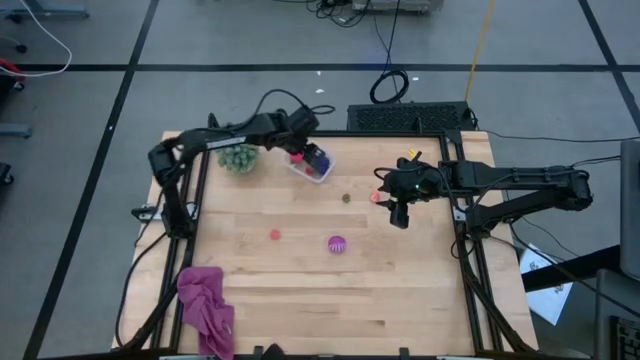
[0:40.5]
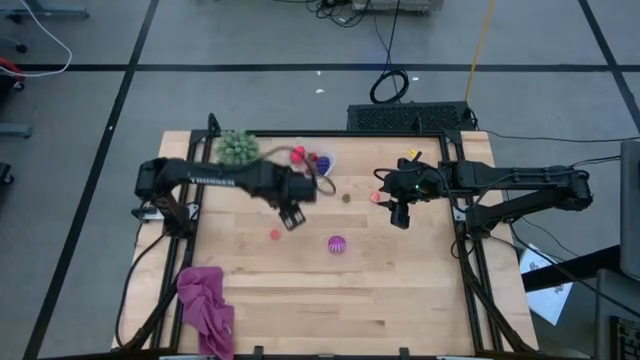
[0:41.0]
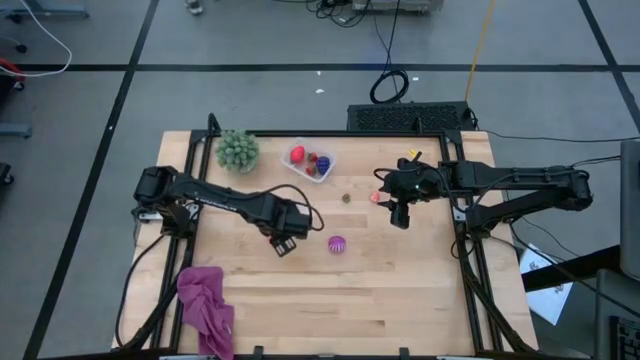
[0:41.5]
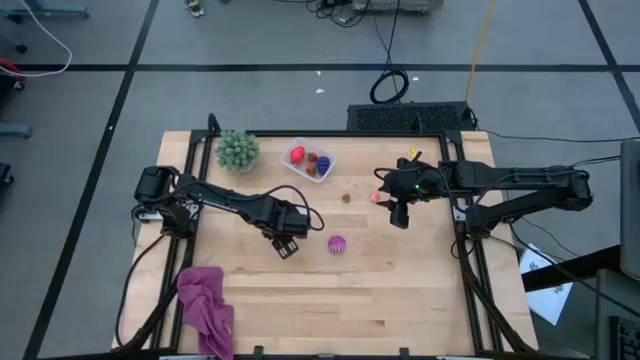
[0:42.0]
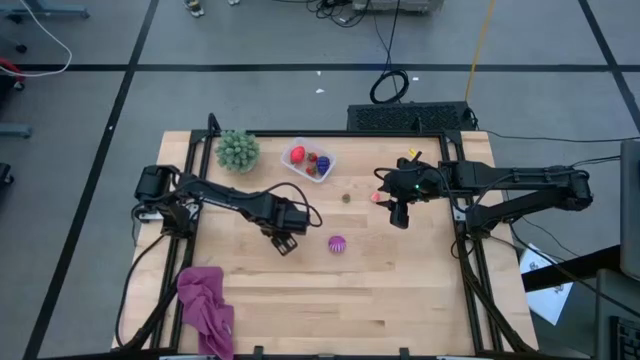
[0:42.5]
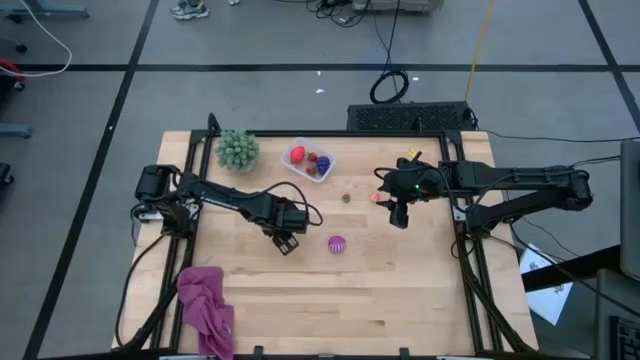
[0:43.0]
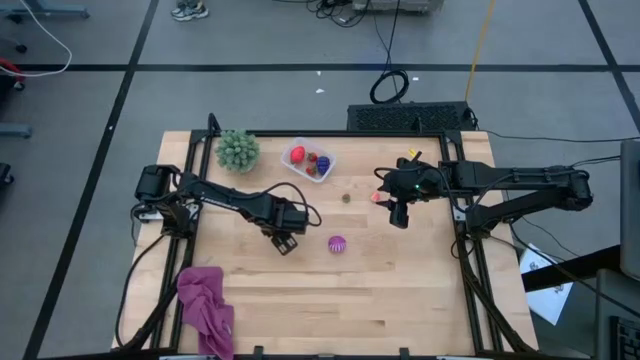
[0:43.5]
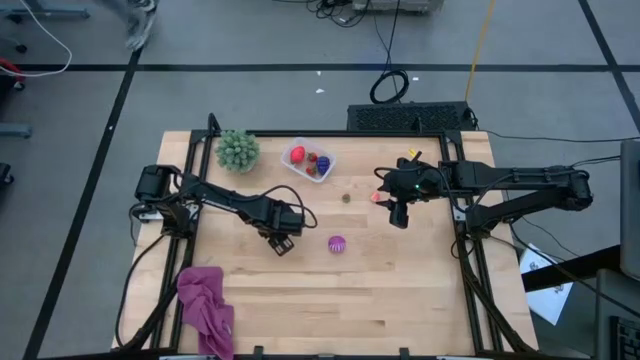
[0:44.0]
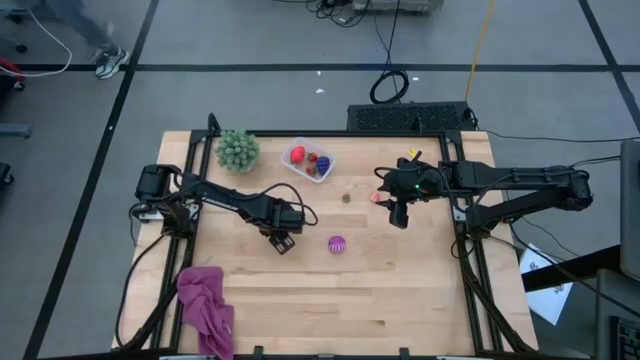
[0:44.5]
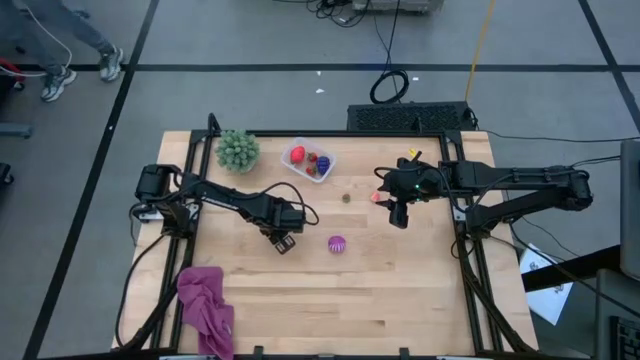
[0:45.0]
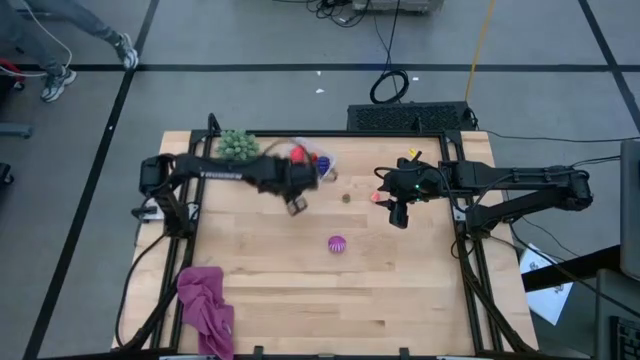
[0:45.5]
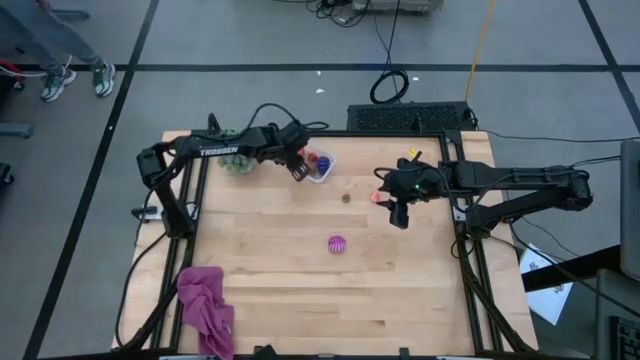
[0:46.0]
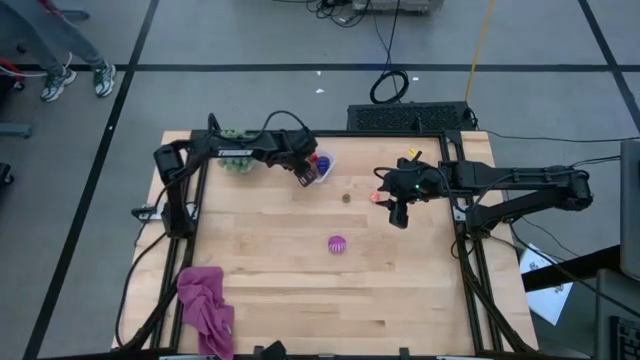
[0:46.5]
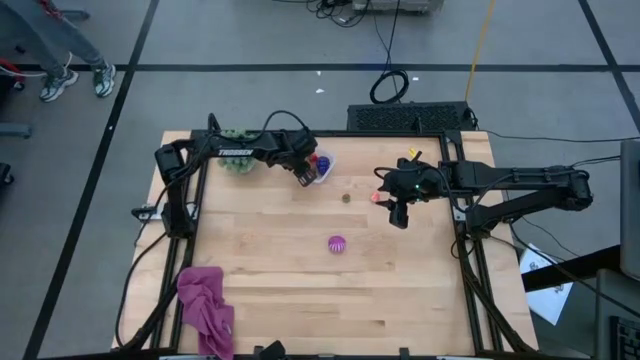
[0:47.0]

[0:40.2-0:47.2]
Task: Pick and placing Produce into tupperware
Put the left pink peach into the transparent bin

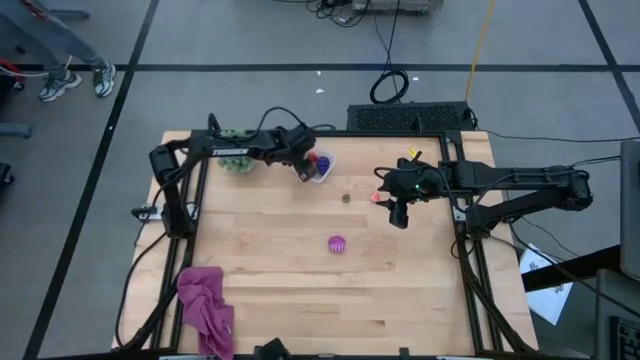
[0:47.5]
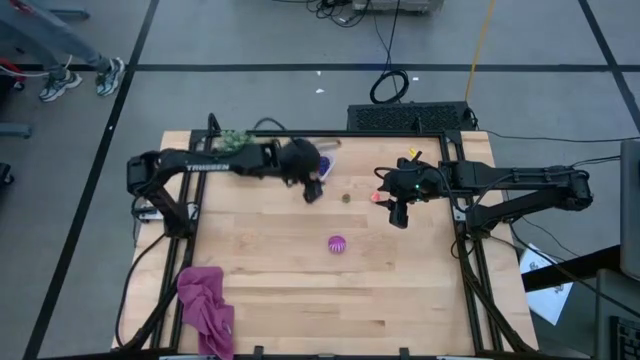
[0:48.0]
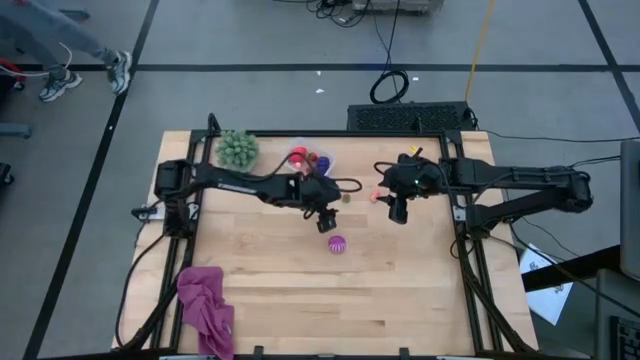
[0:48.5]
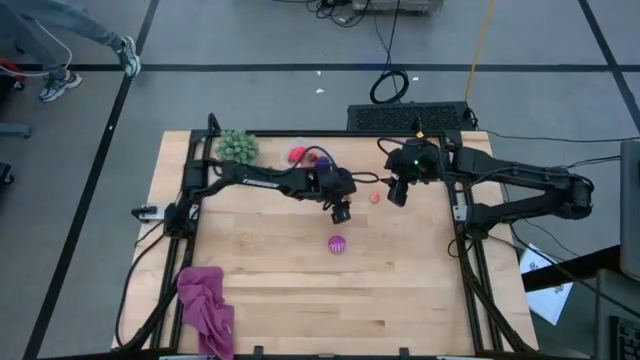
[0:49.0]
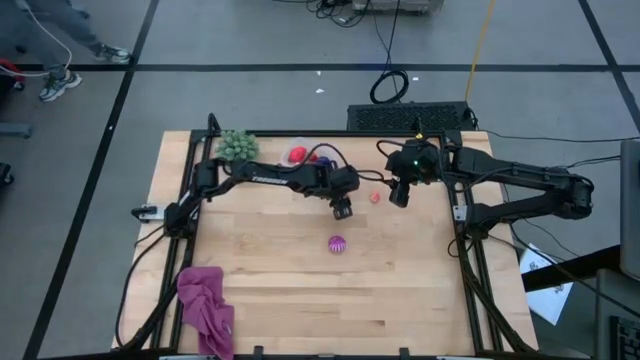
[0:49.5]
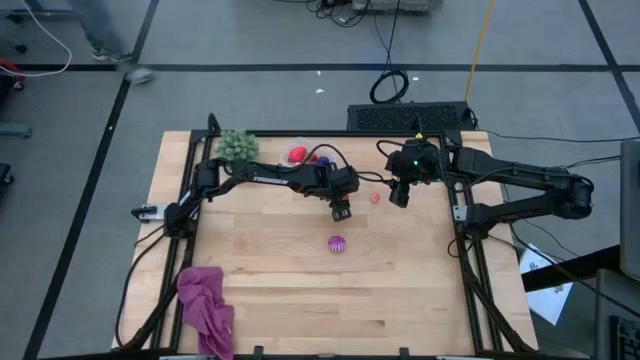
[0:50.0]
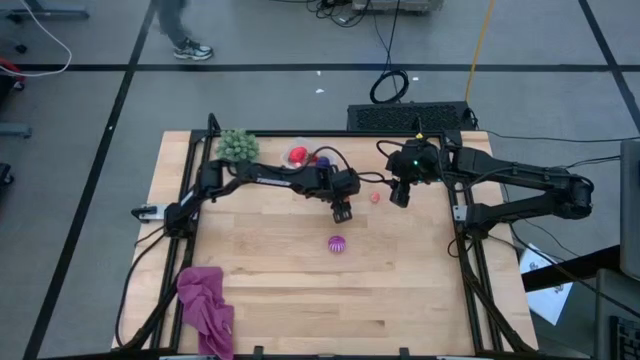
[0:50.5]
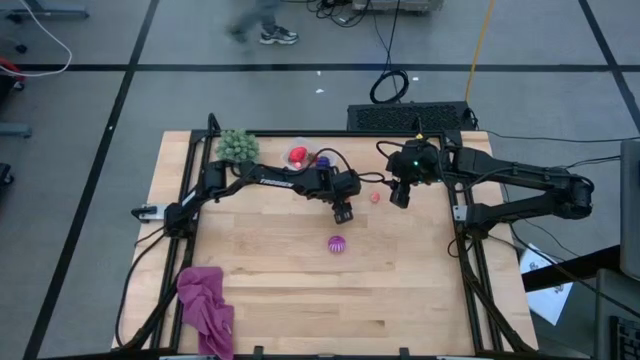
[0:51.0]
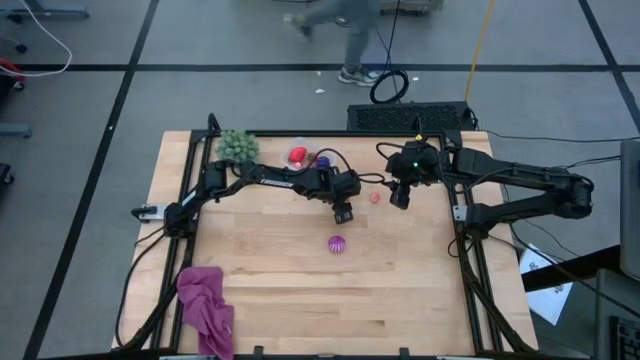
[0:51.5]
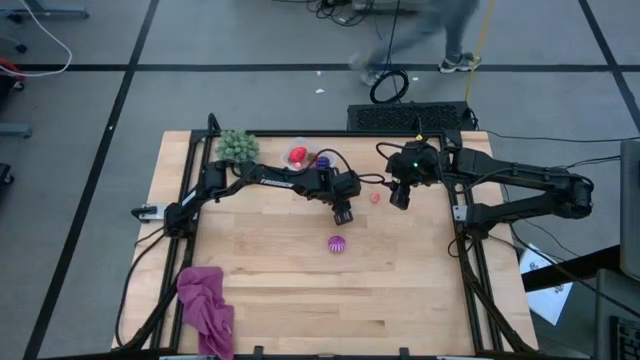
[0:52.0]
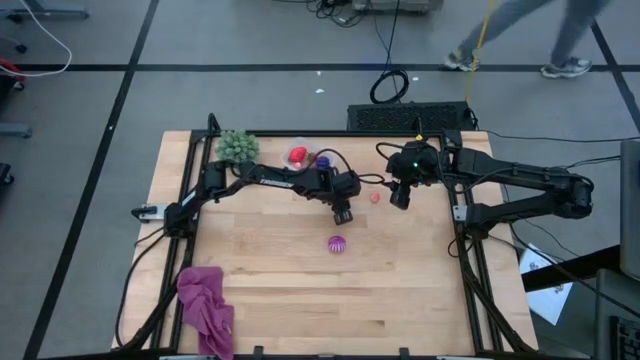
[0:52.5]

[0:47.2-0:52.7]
Put the red strawberry into the transparent bin

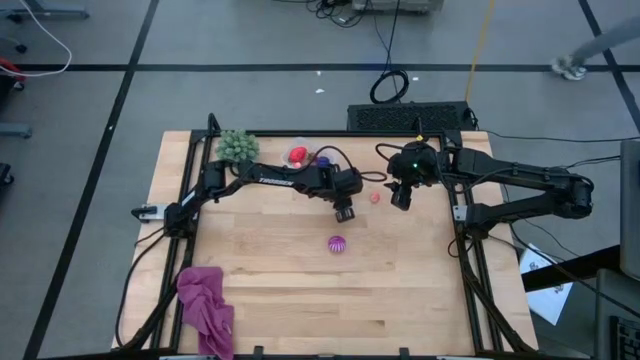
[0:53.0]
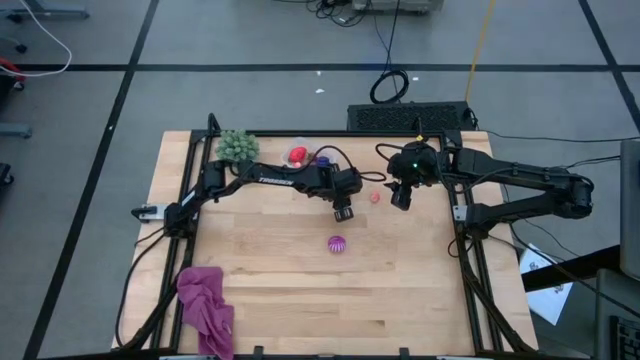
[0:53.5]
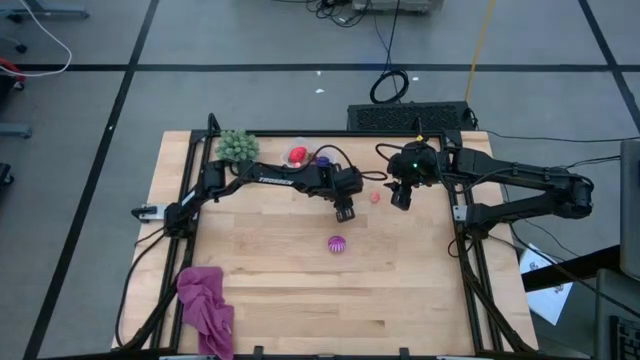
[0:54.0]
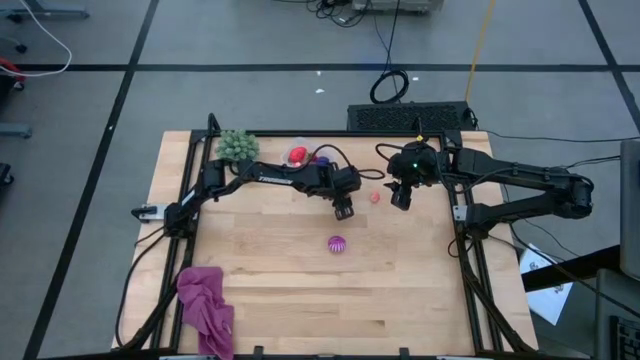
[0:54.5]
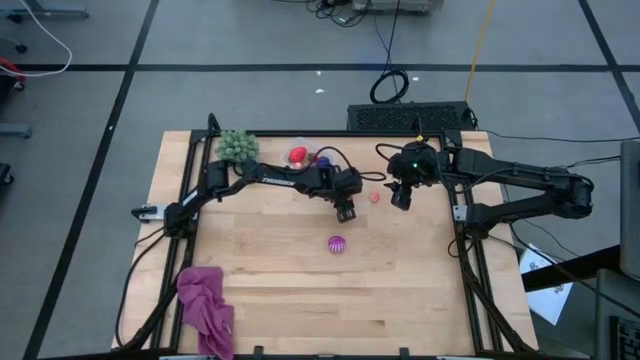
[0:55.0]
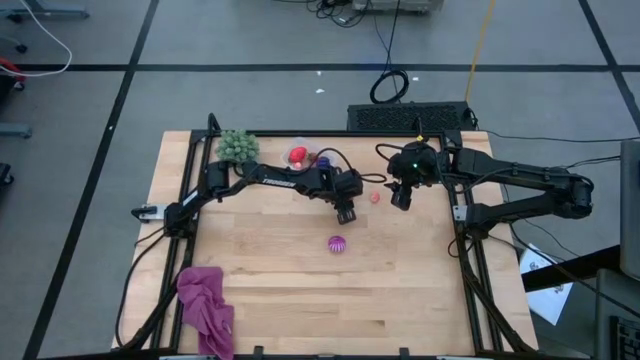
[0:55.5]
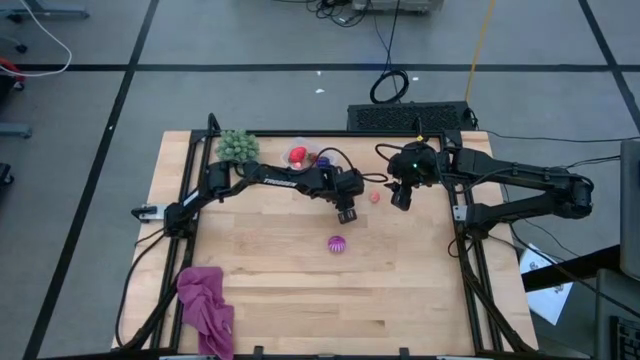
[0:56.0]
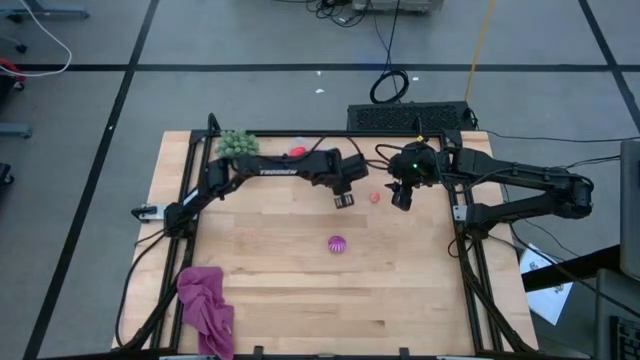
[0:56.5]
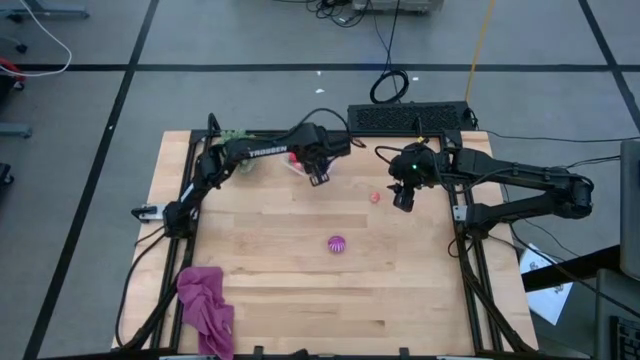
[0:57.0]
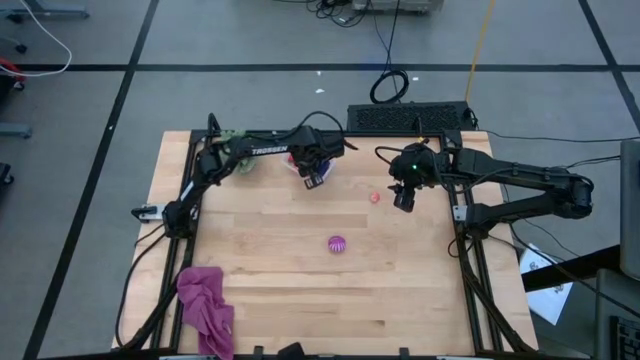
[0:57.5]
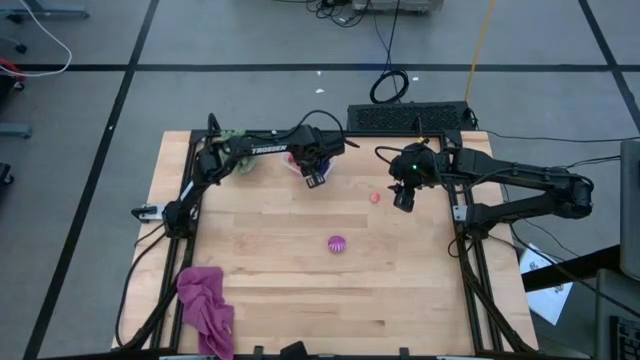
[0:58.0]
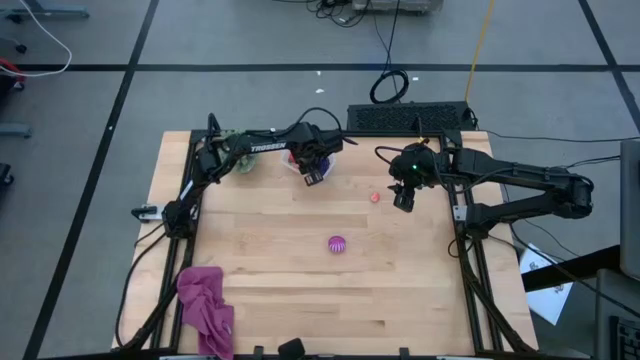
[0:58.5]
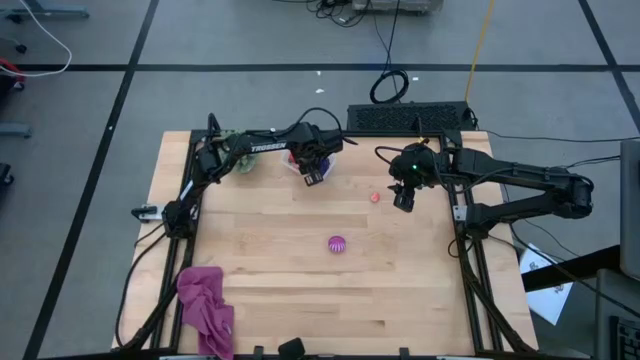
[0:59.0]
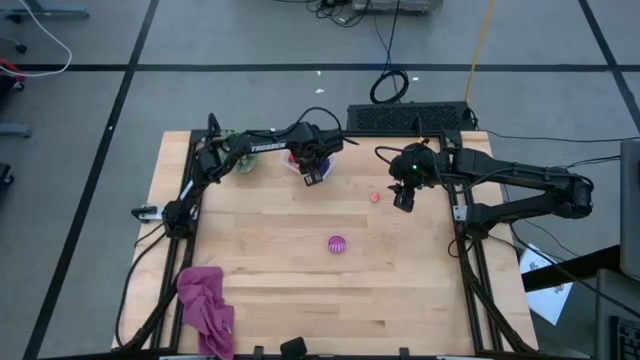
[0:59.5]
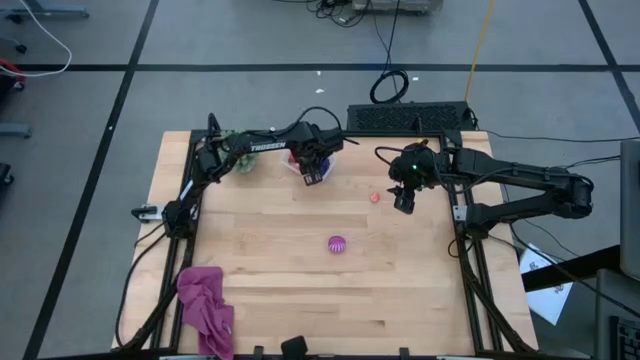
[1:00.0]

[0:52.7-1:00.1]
Put the red strawberry into the transparent bin

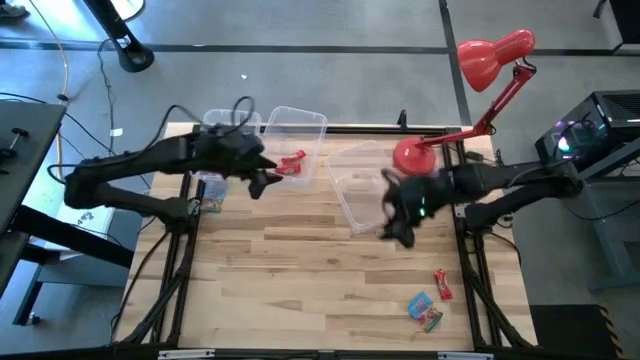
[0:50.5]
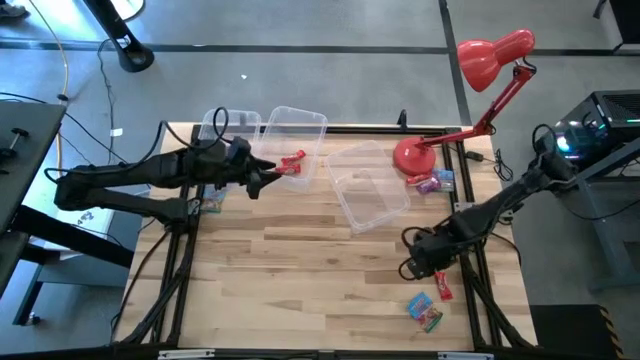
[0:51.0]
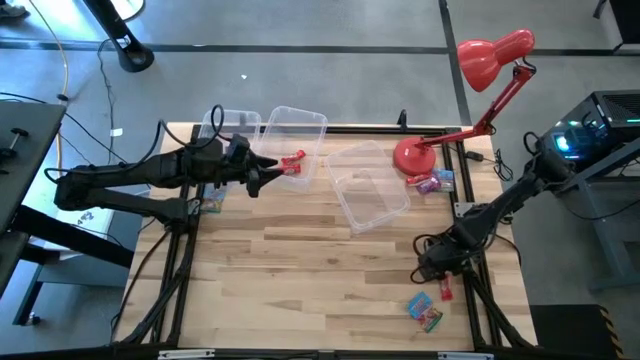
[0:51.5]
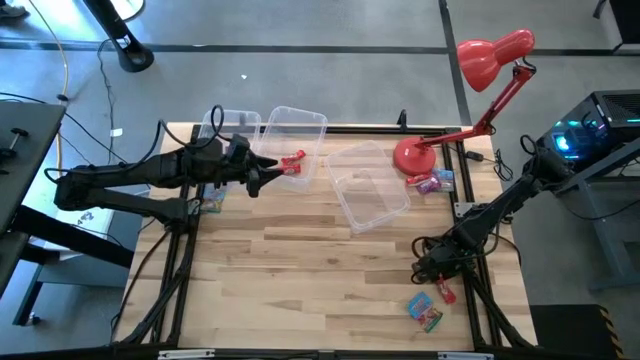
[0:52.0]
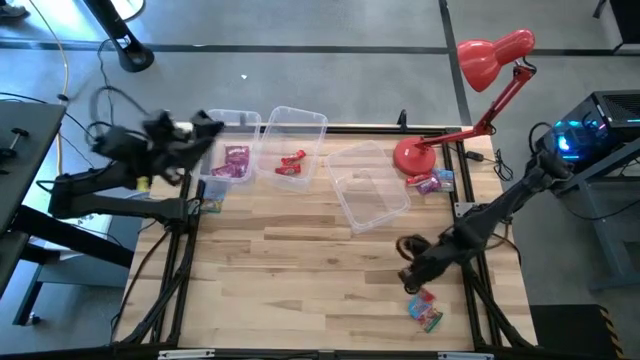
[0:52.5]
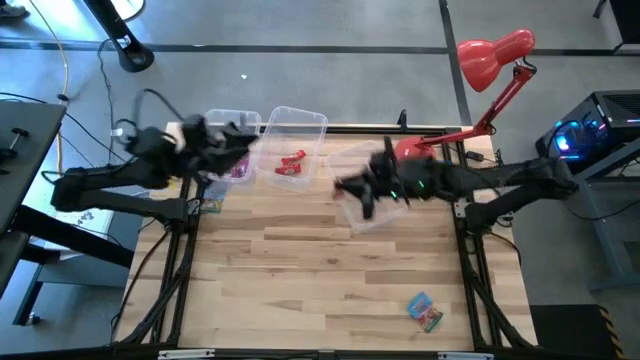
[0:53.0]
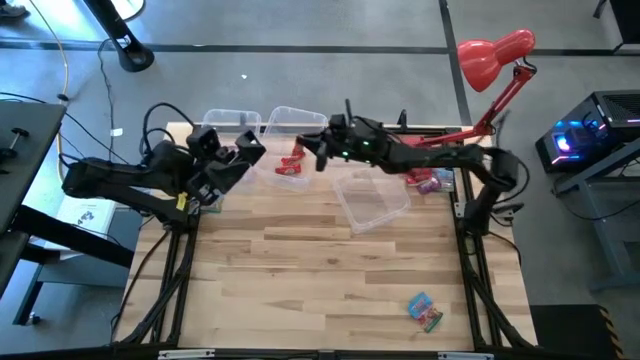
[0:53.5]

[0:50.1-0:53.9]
Task: Sort candy
Put the red candy bag into the center transparent bin
